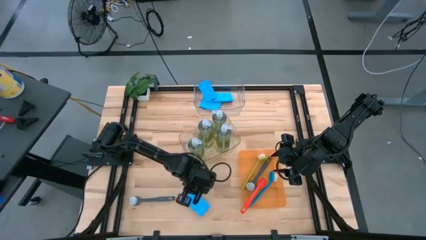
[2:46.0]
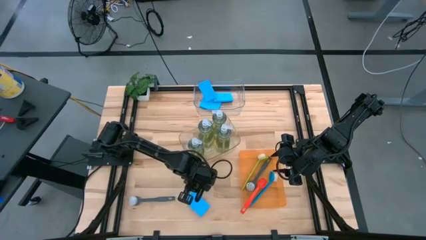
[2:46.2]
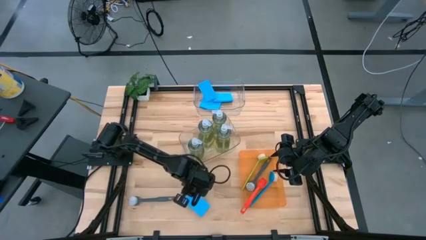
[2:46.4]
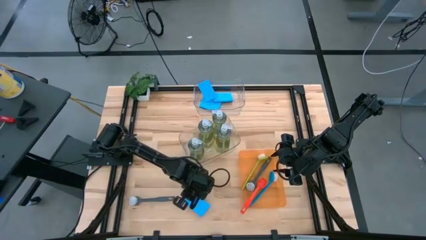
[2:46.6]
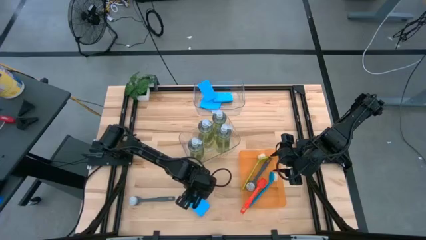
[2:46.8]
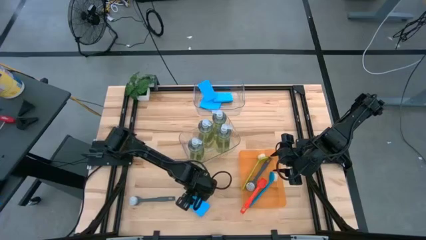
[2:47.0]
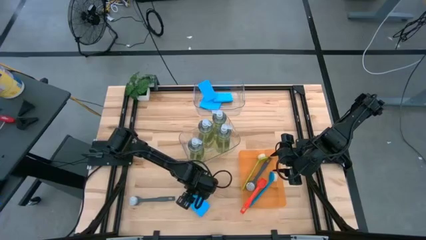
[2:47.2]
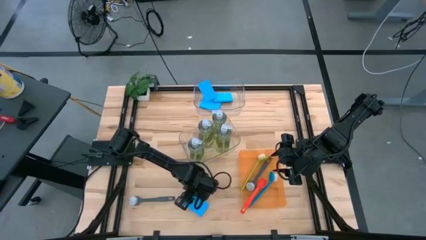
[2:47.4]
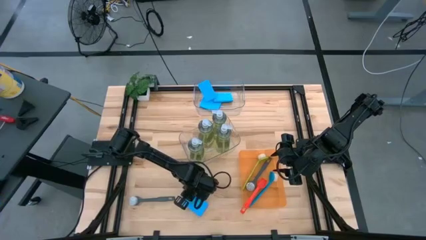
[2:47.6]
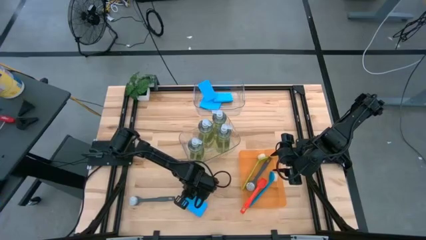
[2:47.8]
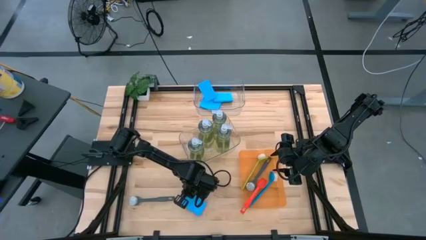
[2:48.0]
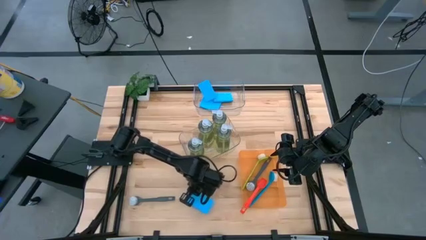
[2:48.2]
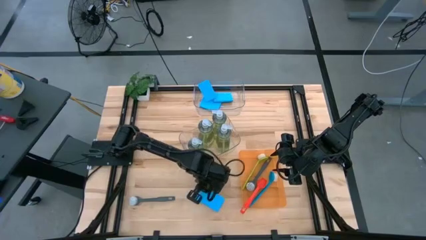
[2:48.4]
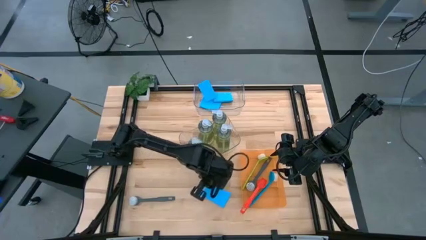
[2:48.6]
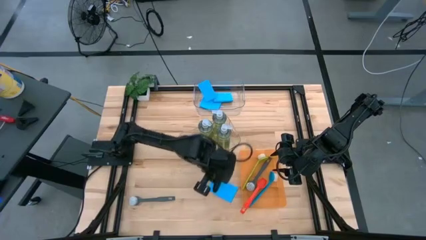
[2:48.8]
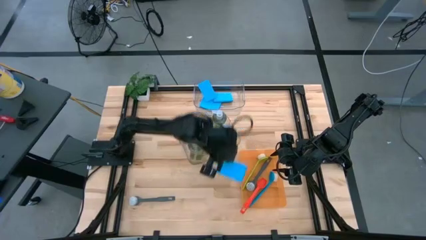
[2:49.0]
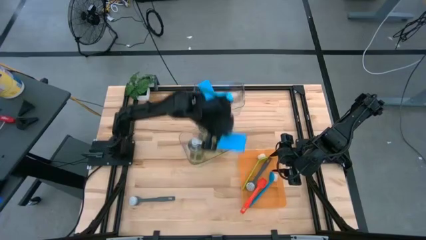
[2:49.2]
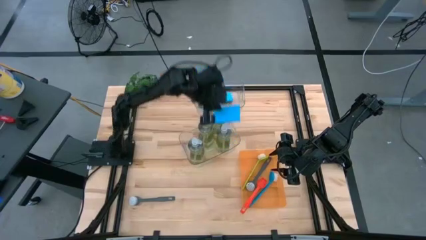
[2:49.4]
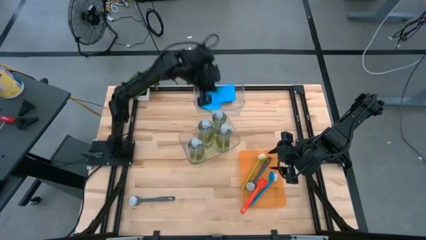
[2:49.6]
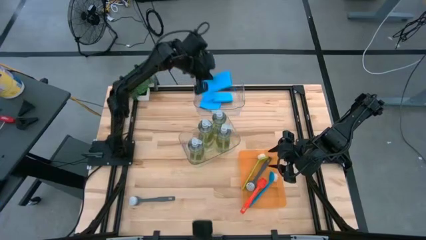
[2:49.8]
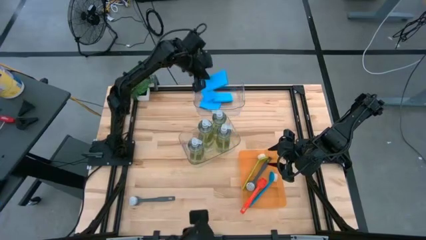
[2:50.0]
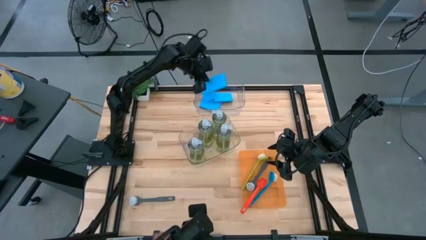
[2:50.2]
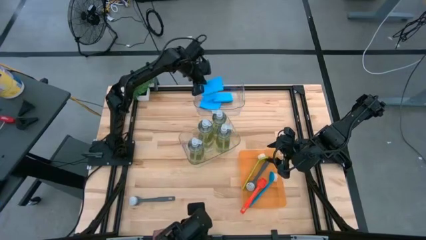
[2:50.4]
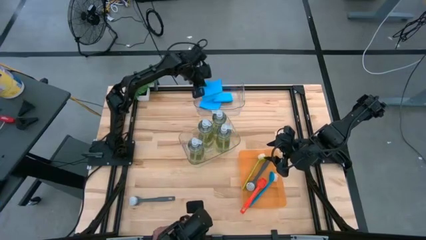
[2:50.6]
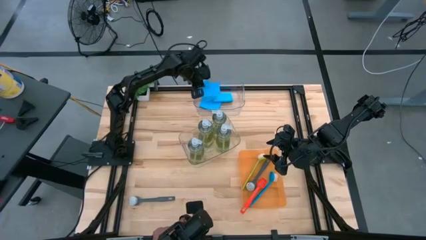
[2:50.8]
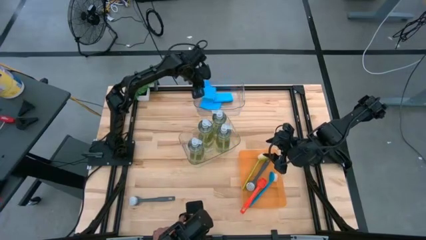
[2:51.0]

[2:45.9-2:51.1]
Task: Pick & Place Kitchen Sink Supplies
Put the blue sponge into the top transparent bin

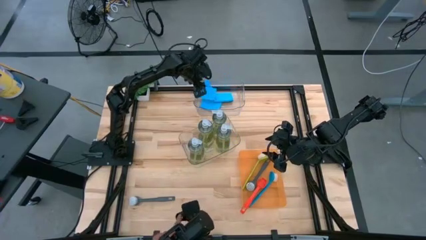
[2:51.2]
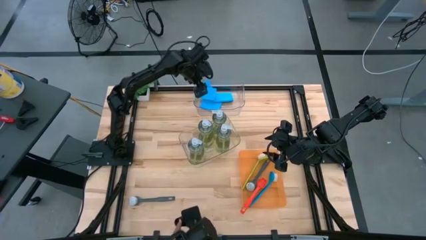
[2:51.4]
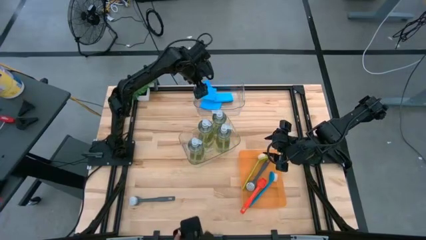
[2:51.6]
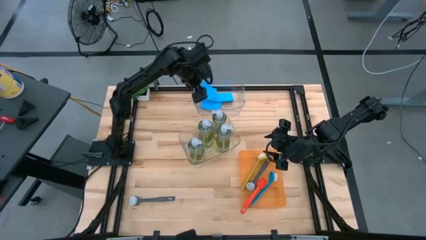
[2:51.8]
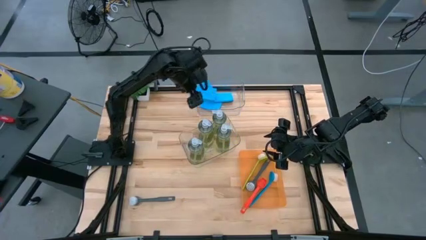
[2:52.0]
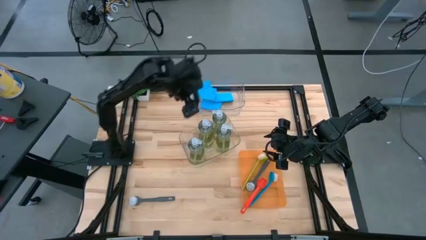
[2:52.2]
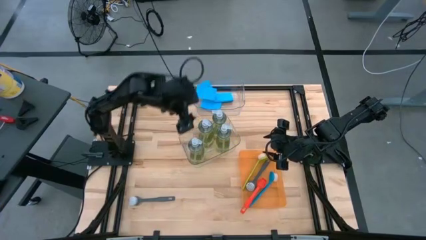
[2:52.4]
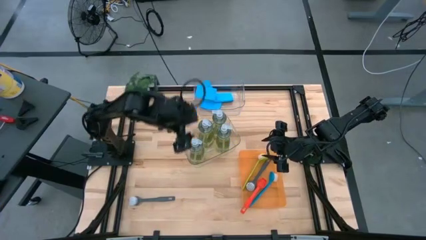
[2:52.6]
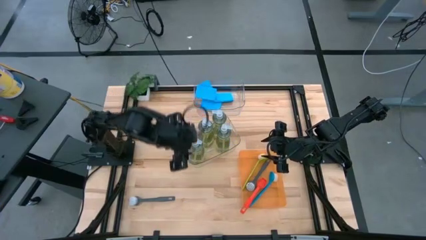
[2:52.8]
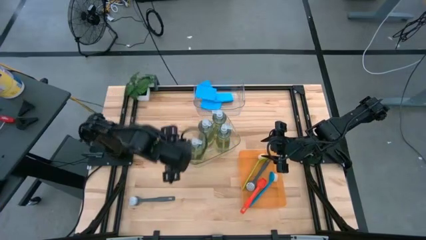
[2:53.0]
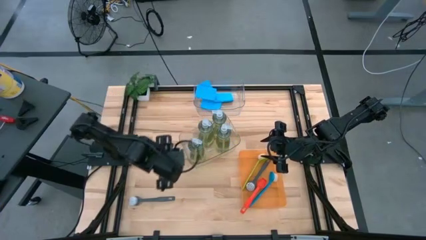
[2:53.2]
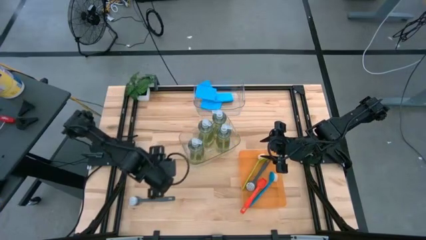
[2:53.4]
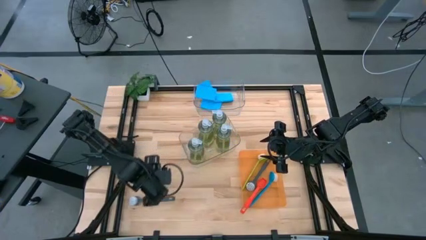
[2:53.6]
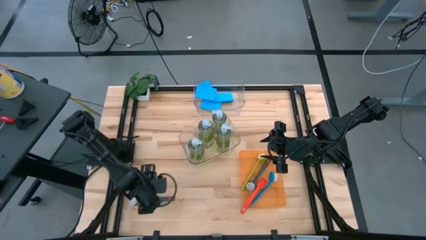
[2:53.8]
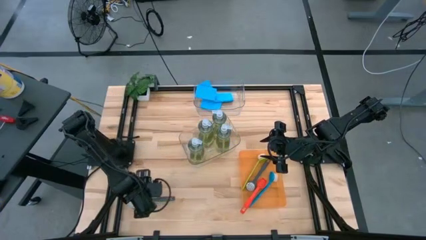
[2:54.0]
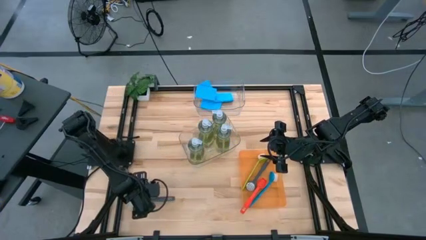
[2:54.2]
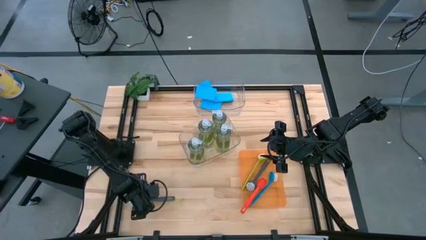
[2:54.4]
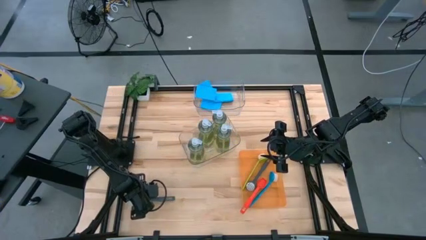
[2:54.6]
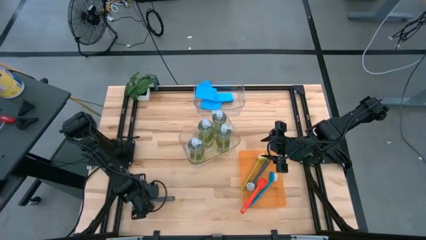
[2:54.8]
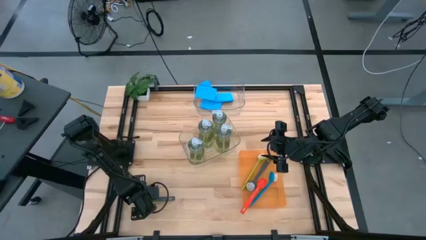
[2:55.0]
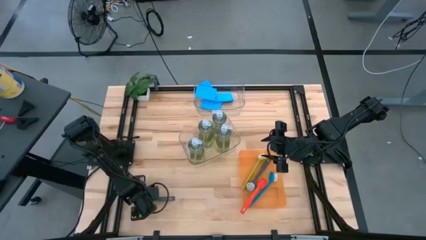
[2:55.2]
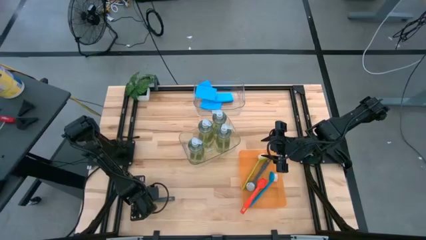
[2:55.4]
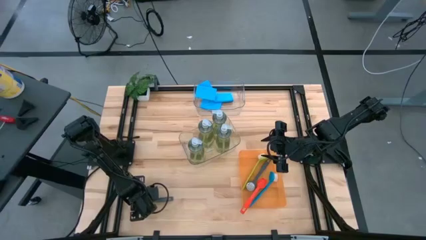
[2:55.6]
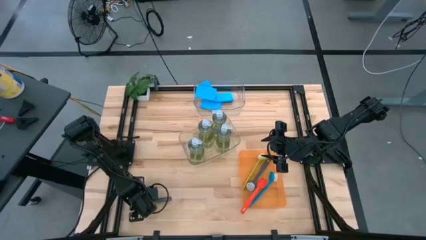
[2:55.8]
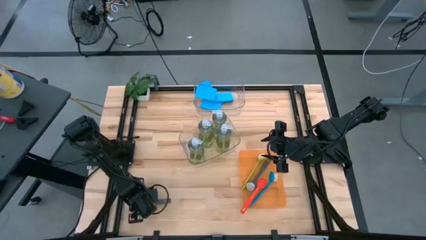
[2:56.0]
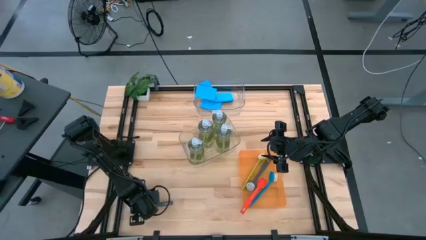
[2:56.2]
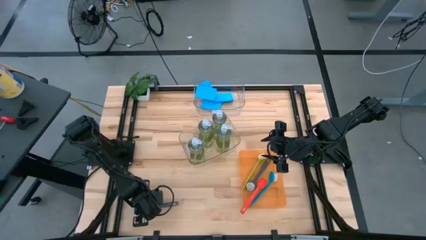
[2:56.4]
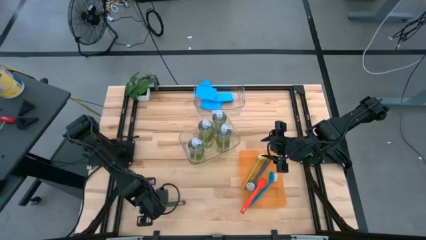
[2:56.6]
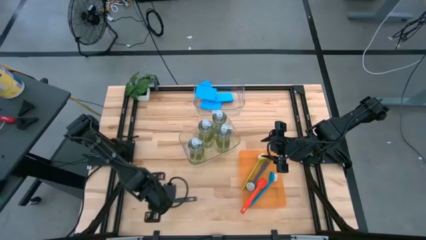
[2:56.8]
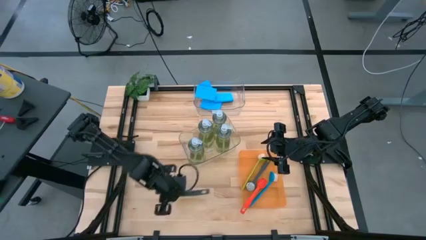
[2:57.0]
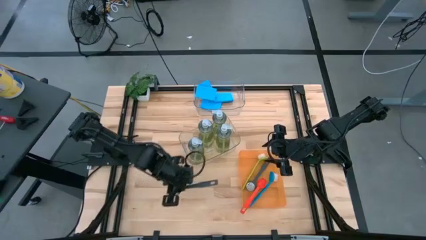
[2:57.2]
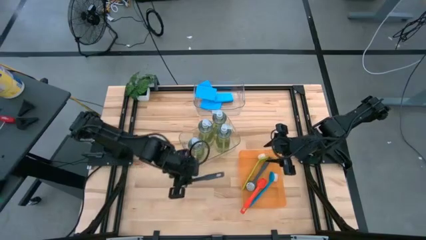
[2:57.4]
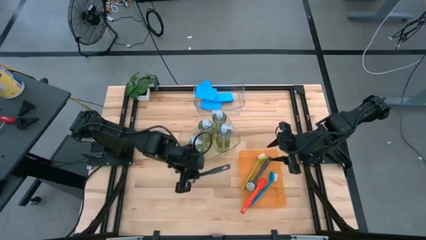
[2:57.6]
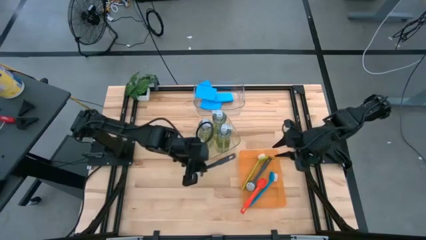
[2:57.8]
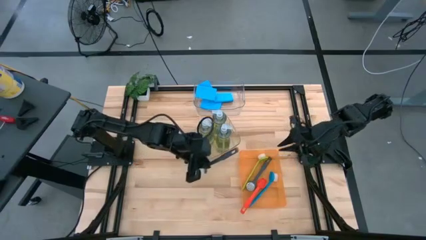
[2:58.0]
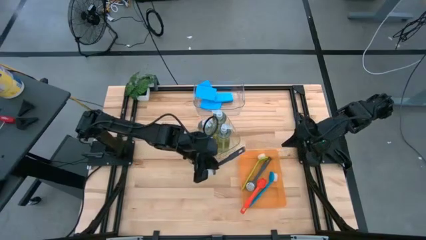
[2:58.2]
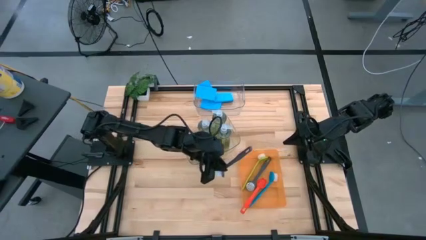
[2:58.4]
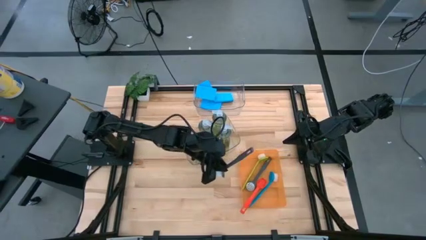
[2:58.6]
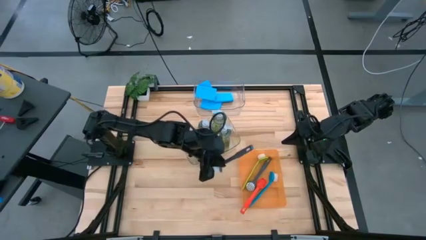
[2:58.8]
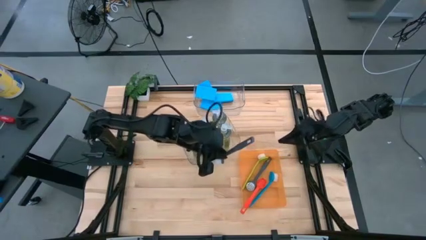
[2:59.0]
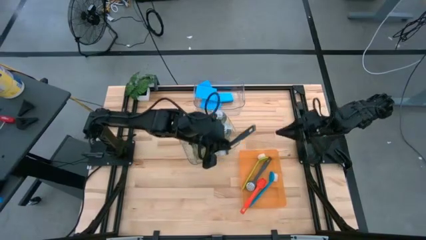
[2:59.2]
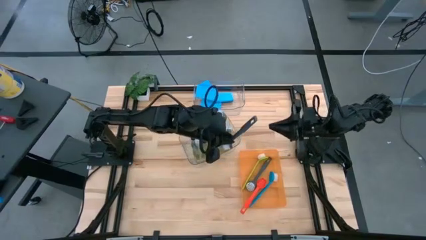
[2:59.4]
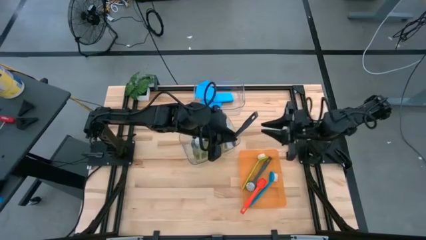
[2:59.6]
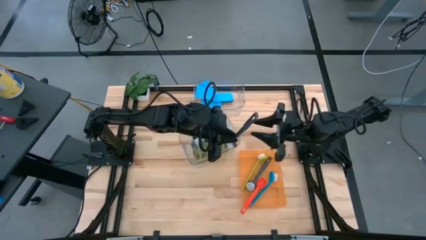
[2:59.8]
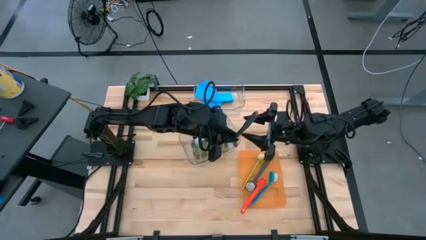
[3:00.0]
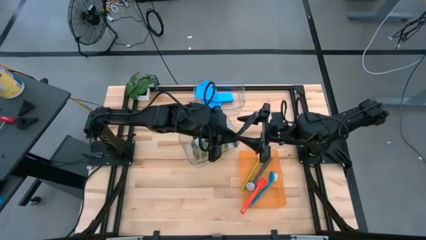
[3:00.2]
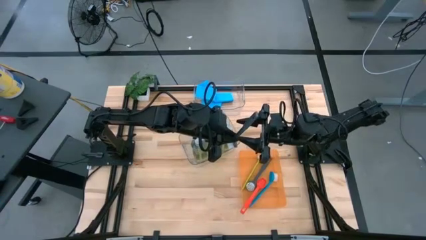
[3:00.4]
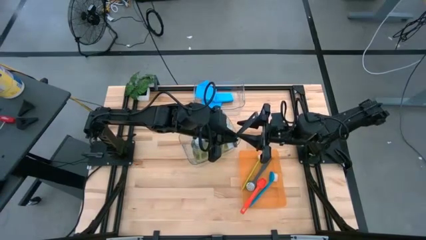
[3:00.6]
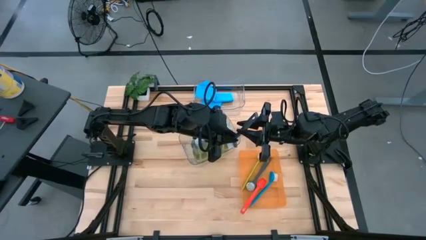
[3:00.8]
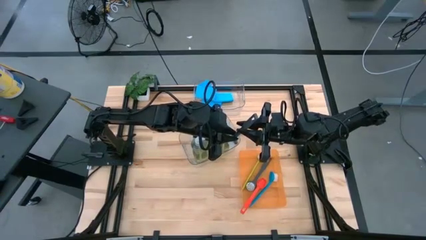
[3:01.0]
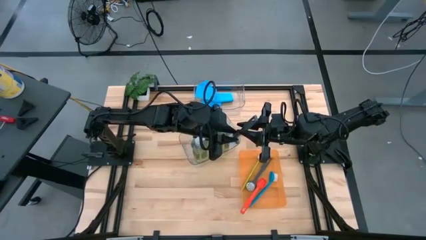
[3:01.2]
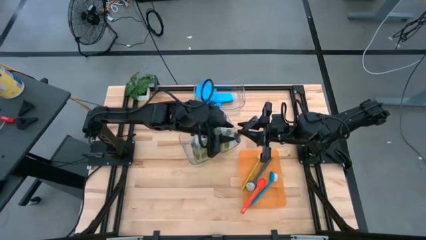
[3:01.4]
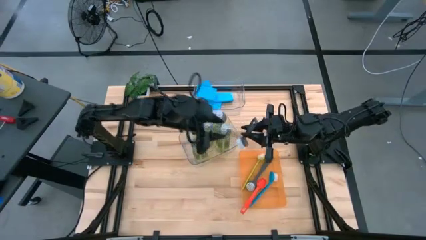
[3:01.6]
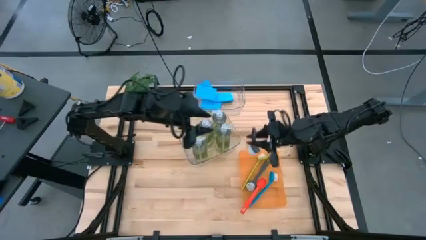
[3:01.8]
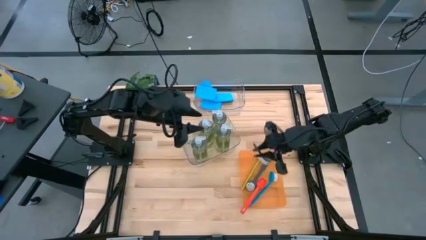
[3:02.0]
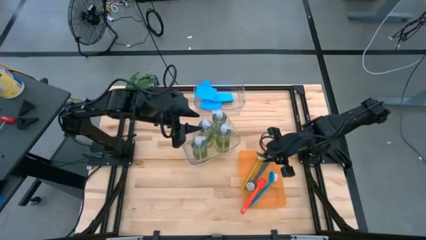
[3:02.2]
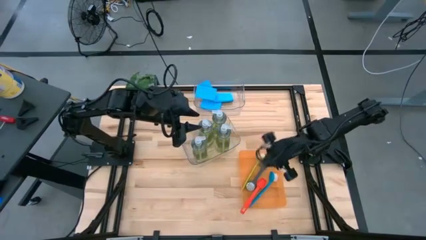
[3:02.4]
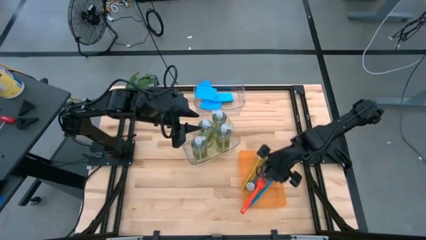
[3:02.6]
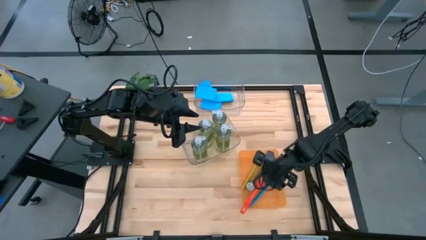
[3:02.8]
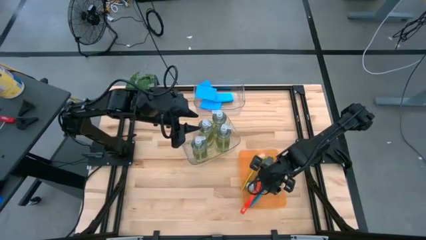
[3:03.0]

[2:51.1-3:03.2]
Put the gray dish brush into the orange bin
